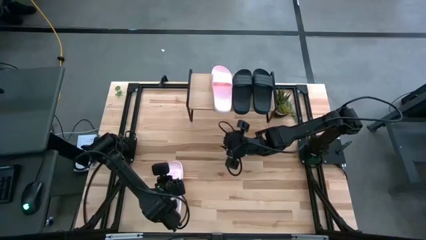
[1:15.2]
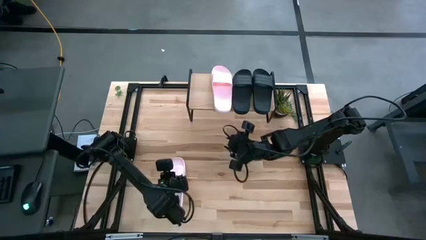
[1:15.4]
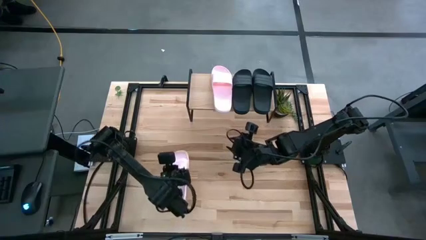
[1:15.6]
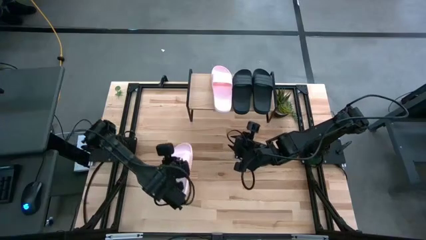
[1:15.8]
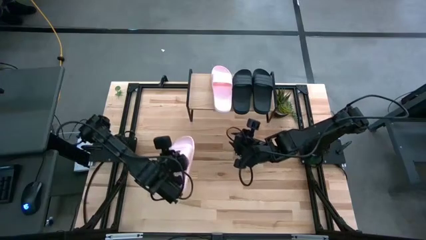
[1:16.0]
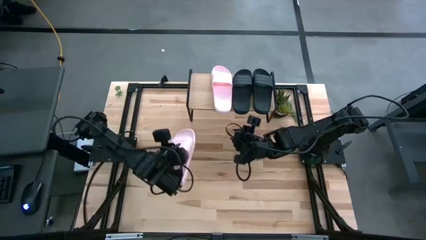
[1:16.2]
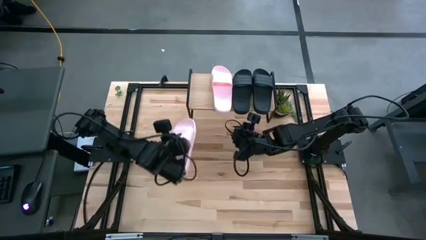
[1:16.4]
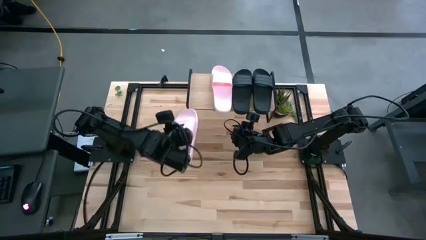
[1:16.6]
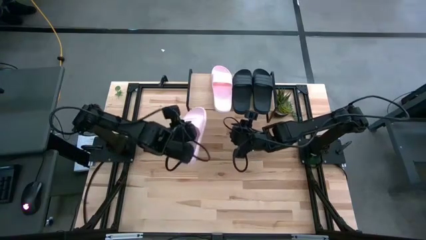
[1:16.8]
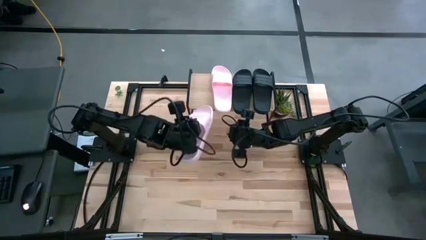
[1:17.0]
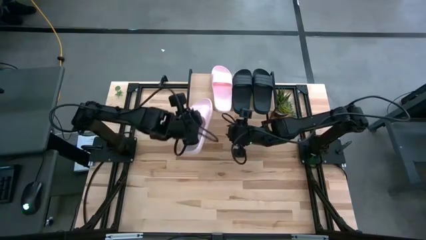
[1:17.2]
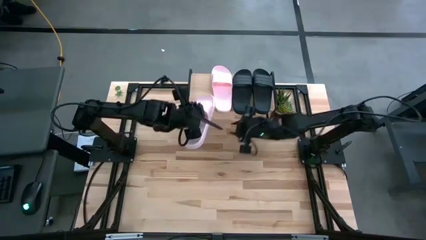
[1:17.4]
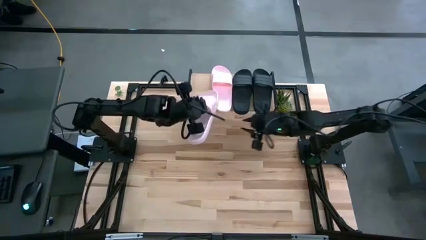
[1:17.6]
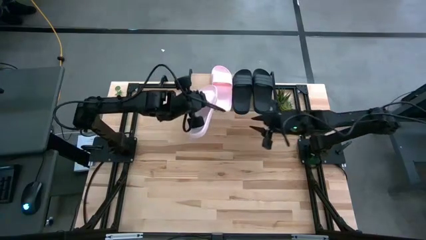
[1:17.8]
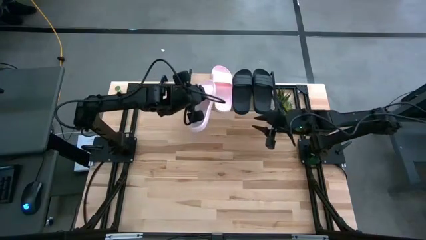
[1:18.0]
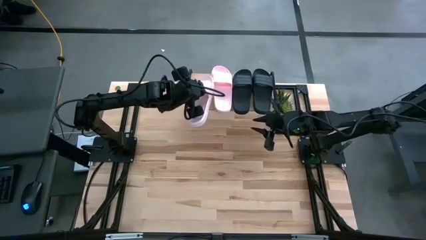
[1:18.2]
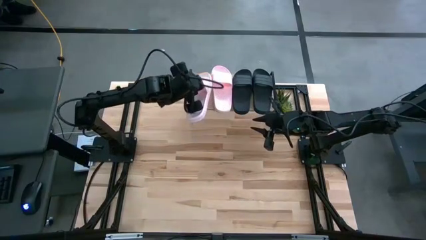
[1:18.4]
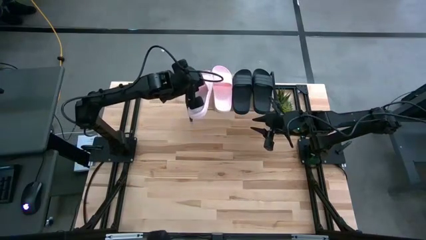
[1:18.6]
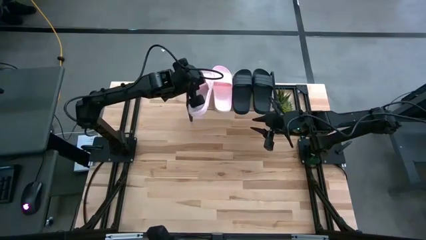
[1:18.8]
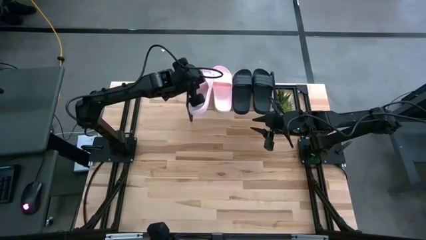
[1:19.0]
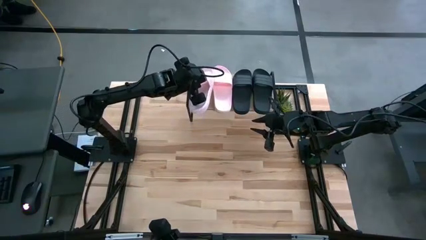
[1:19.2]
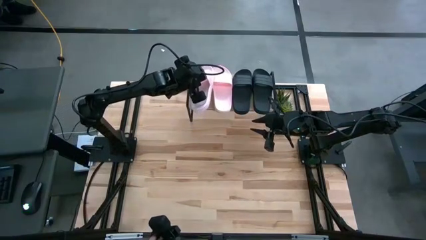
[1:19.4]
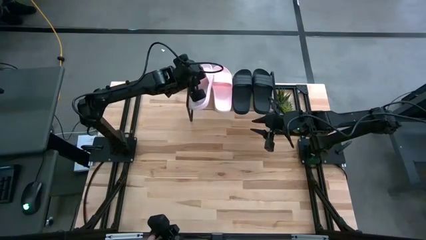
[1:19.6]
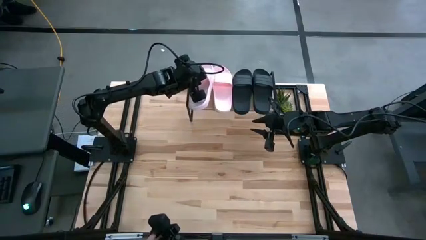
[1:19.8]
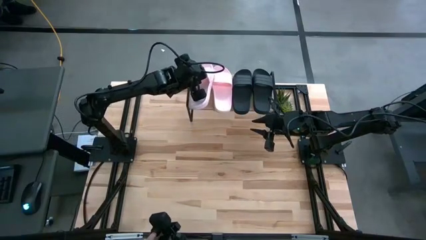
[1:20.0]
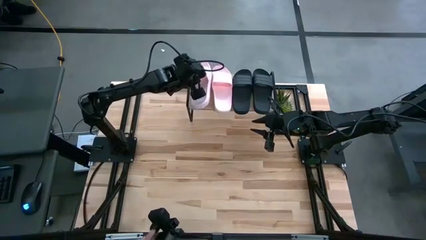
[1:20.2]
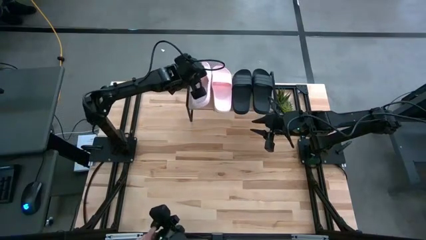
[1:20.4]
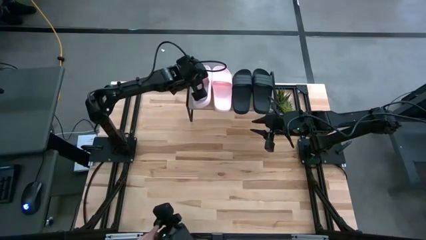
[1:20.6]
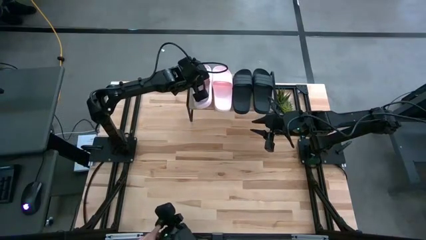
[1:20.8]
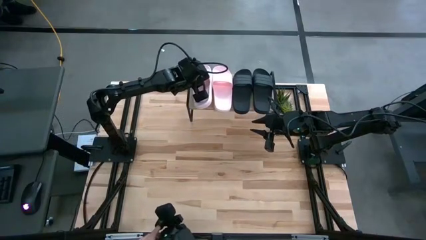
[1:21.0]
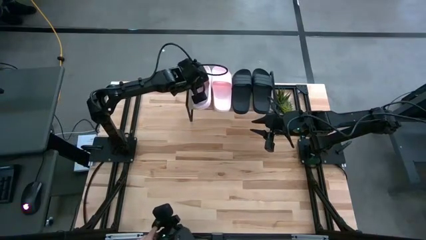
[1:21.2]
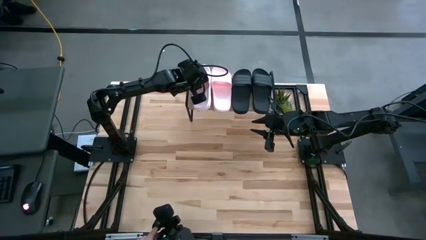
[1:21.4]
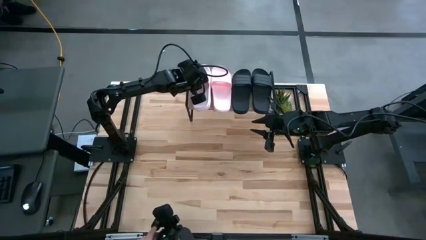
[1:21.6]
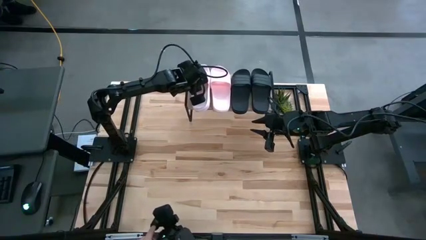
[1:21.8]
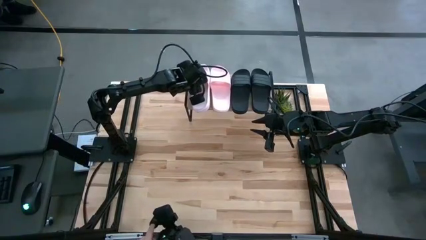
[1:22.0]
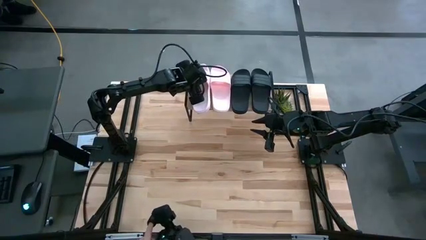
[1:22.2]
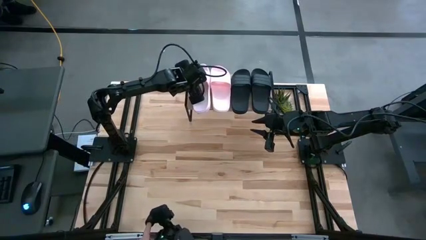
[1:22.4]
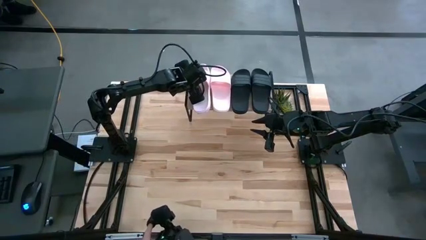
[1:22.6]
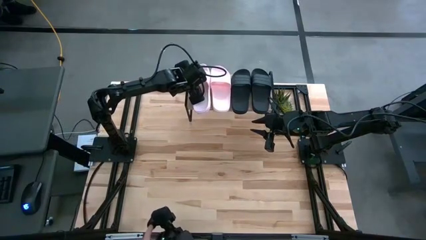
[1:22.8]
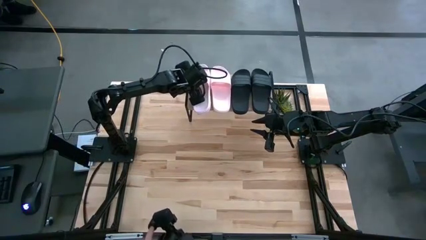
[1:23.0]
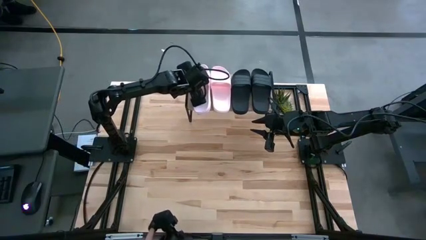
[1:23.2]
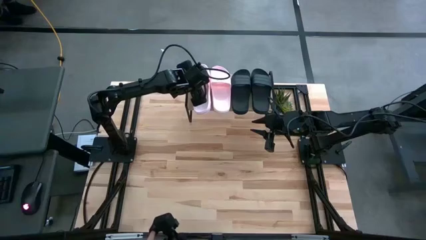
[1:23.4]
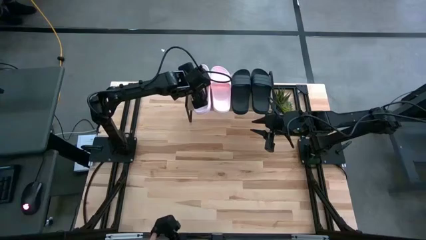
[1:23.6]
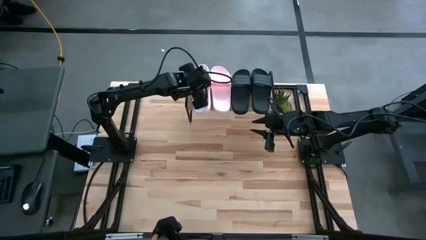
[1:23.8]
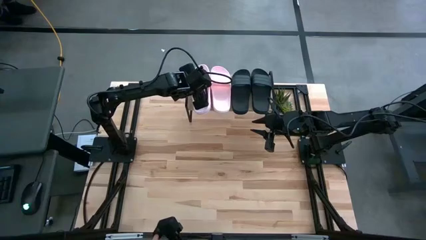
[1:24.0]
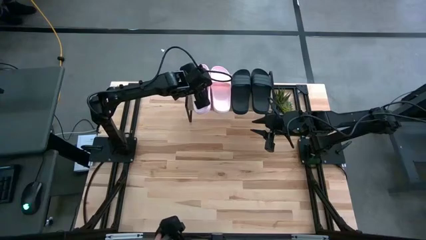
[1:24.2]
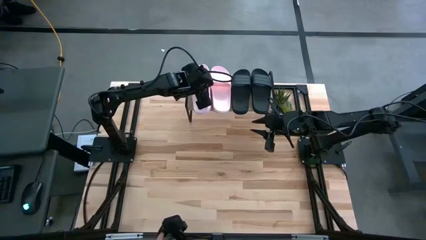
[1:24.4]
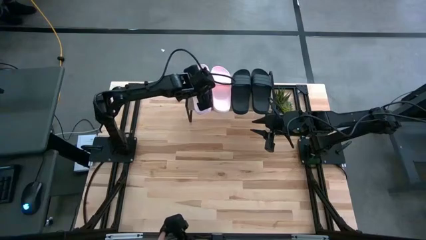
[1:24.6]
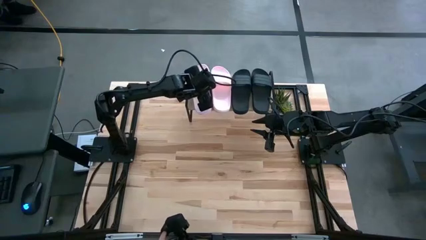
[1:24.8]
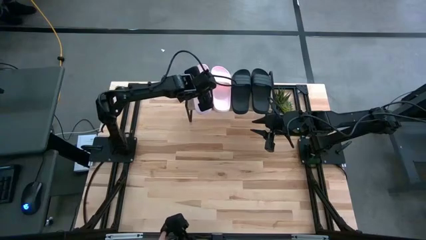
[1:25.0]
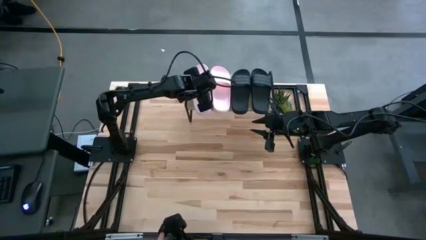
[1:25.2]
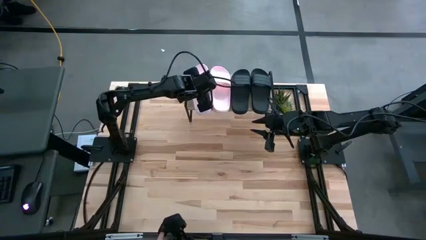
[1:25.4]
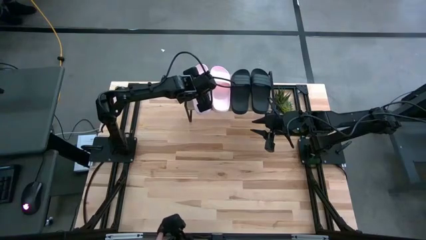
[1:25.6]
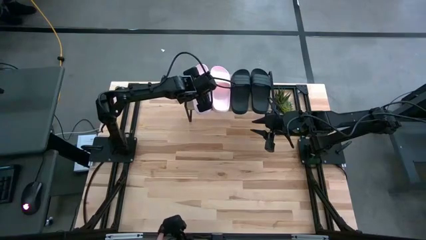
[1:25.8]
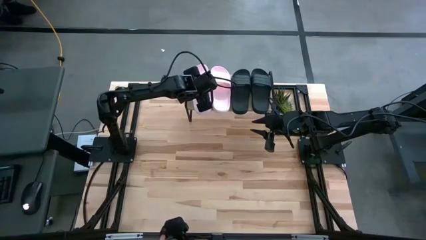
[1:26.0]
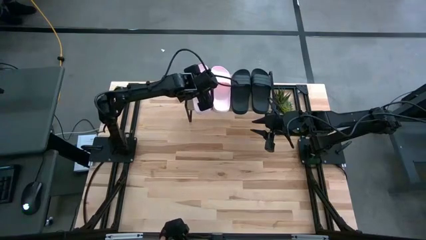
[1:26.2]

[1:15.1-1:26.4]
Task: Pick and place slides into the shelf
Put the pink slipper on the shelf
